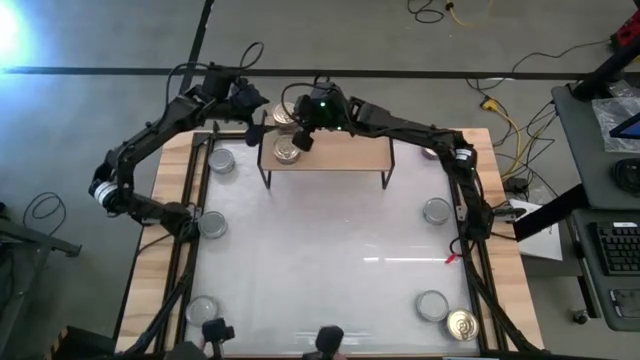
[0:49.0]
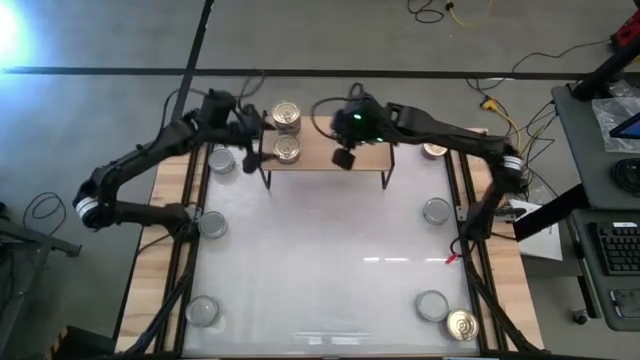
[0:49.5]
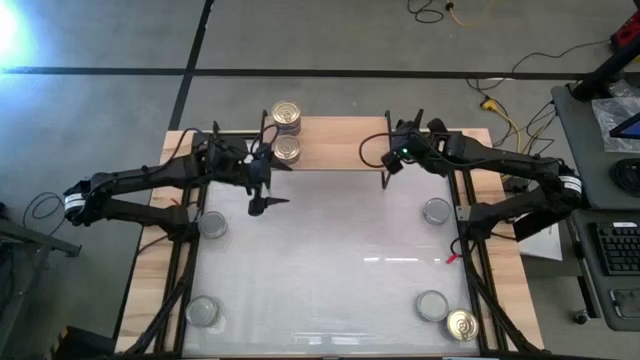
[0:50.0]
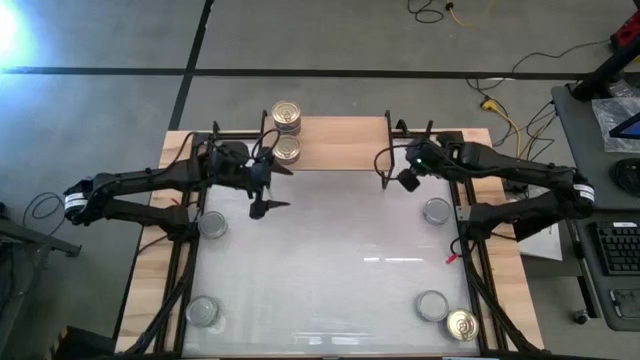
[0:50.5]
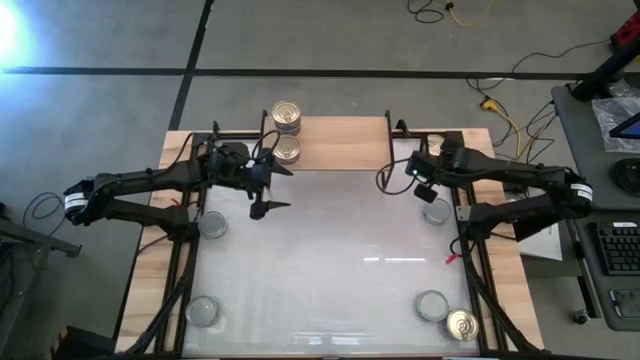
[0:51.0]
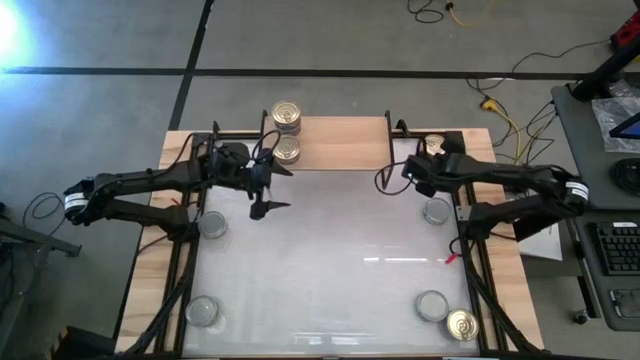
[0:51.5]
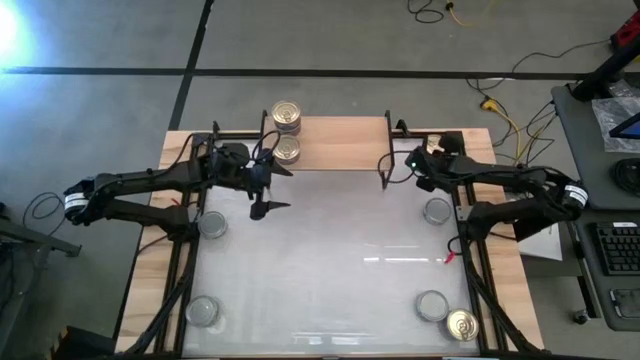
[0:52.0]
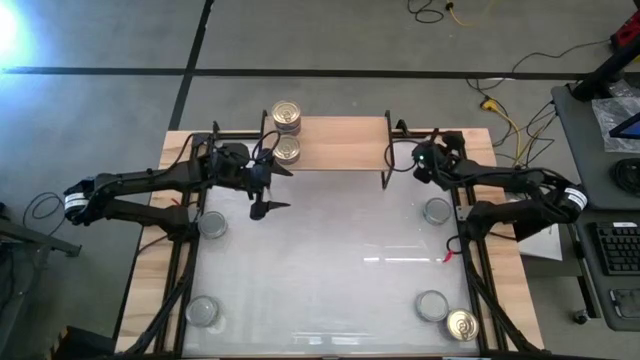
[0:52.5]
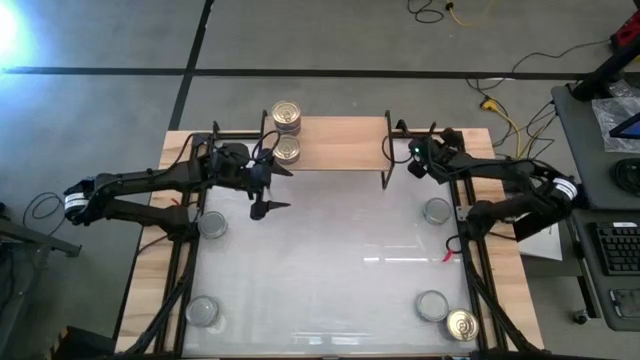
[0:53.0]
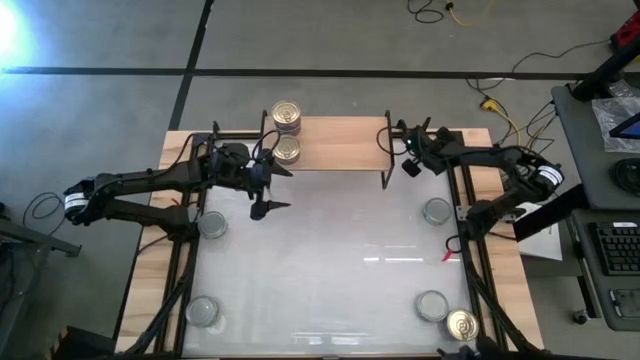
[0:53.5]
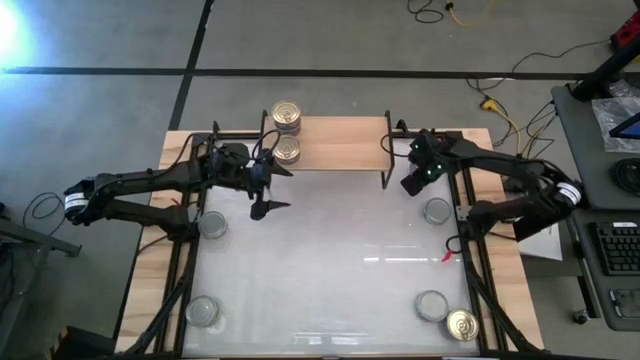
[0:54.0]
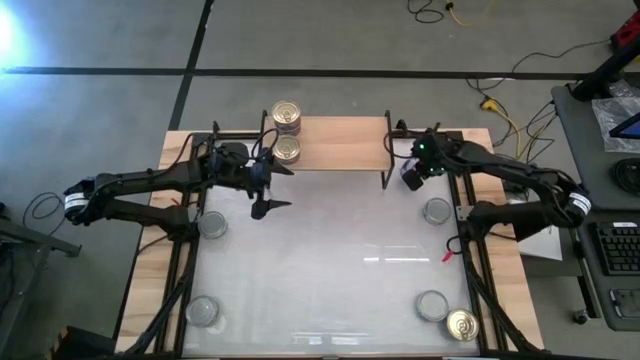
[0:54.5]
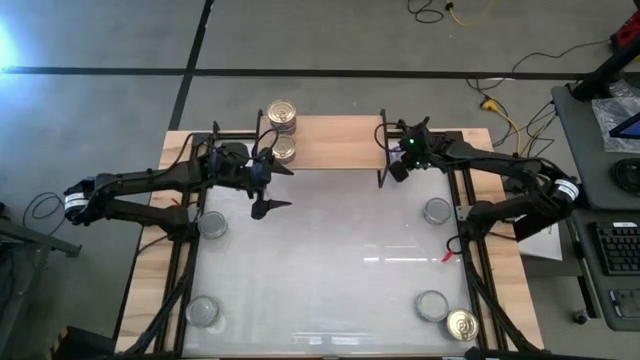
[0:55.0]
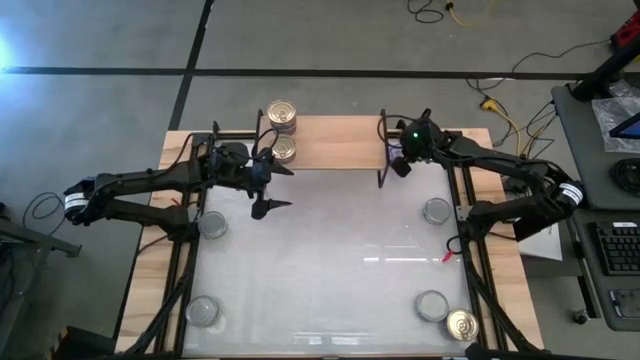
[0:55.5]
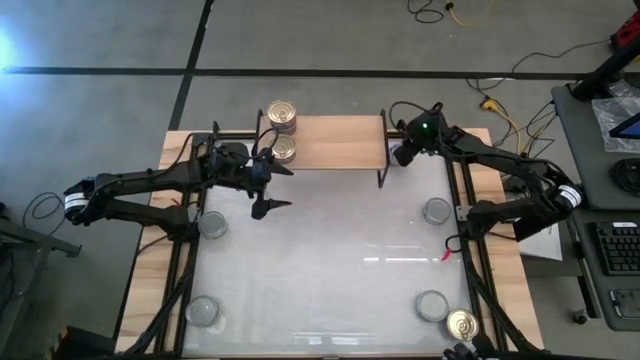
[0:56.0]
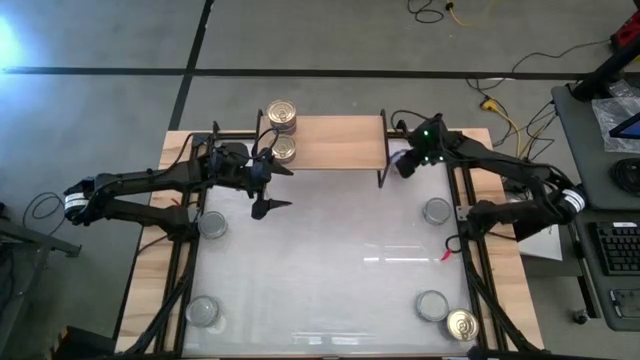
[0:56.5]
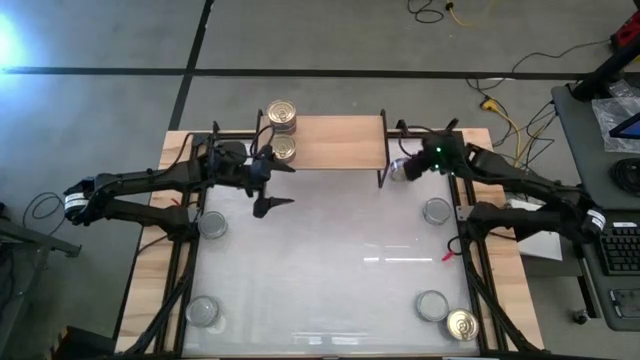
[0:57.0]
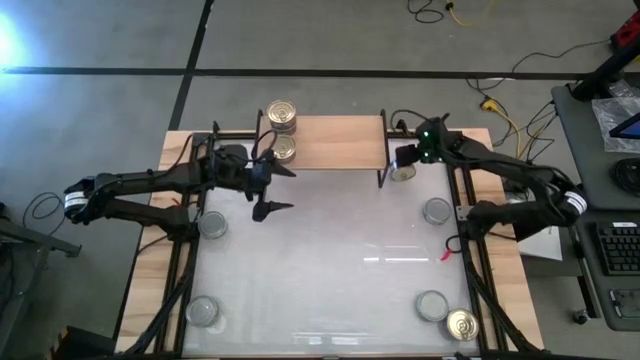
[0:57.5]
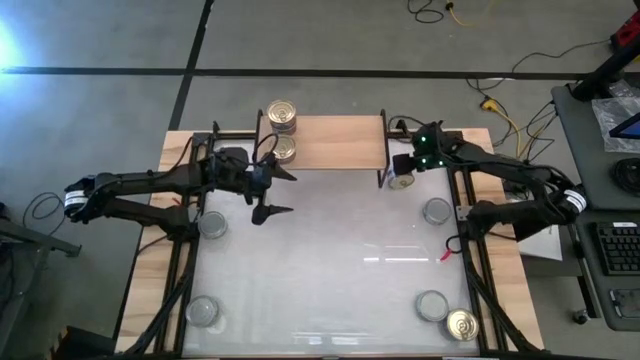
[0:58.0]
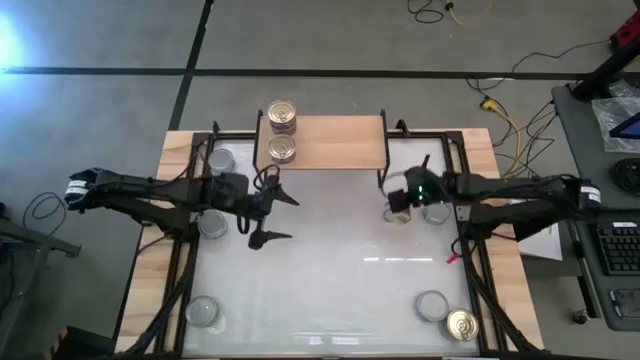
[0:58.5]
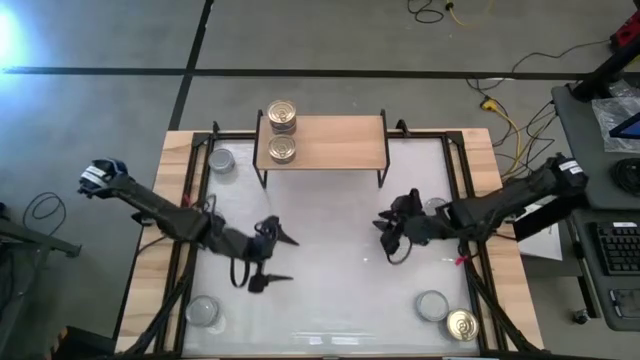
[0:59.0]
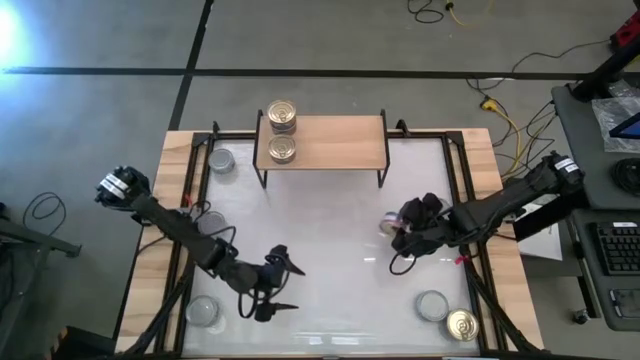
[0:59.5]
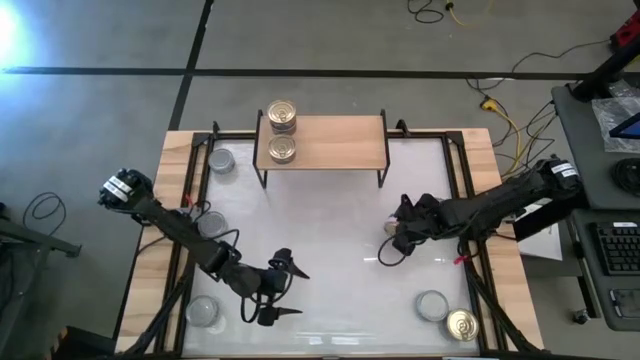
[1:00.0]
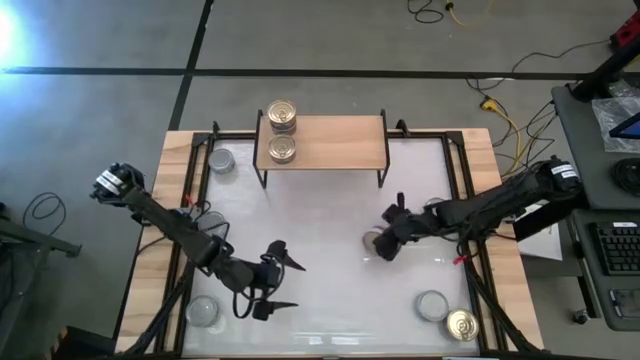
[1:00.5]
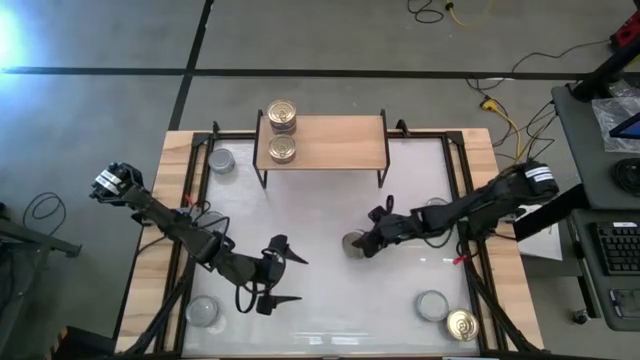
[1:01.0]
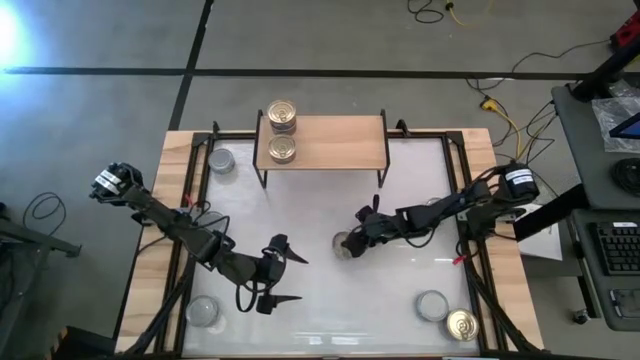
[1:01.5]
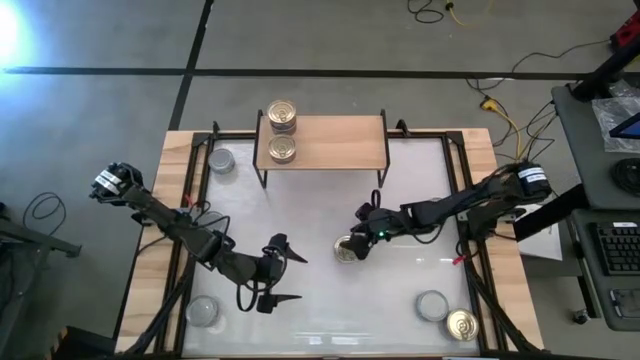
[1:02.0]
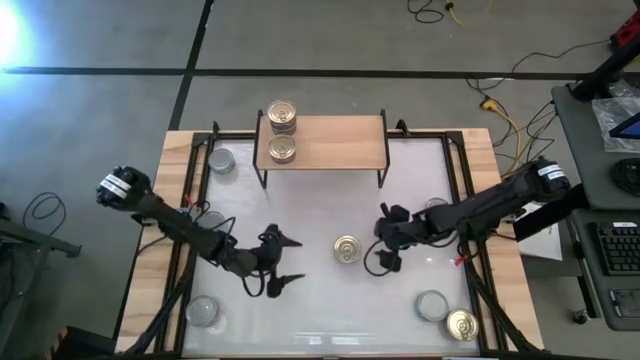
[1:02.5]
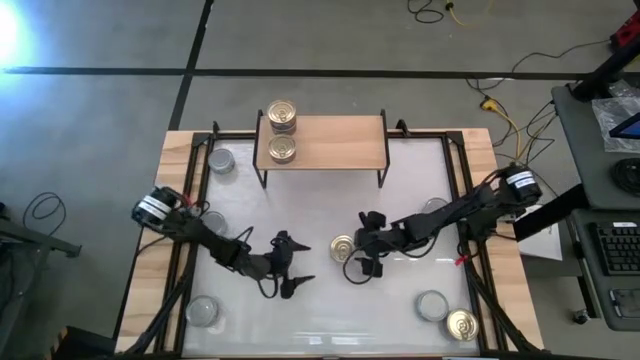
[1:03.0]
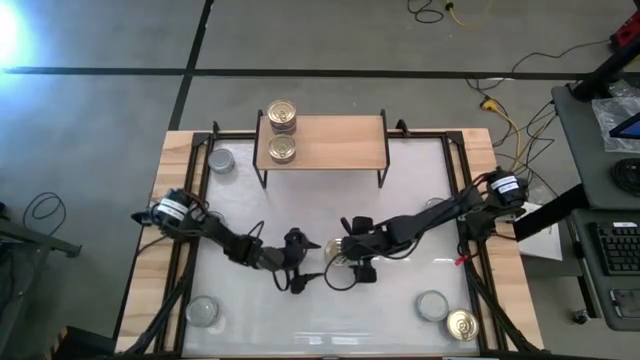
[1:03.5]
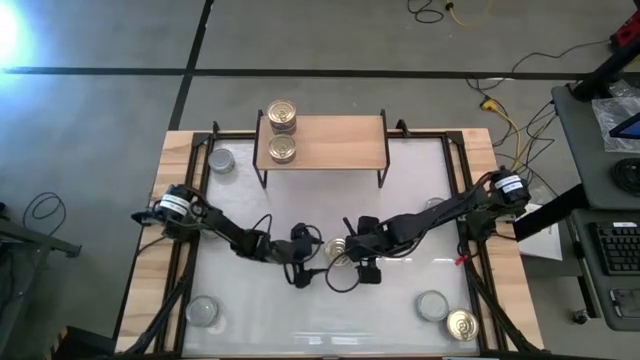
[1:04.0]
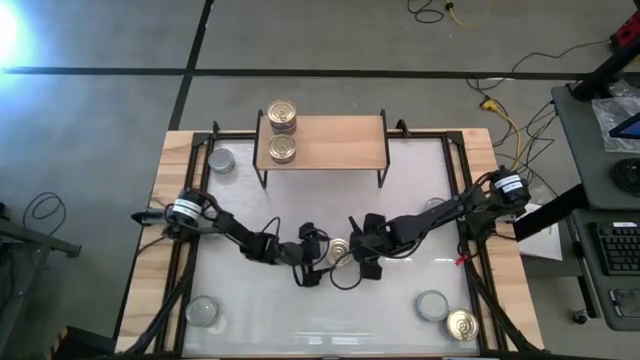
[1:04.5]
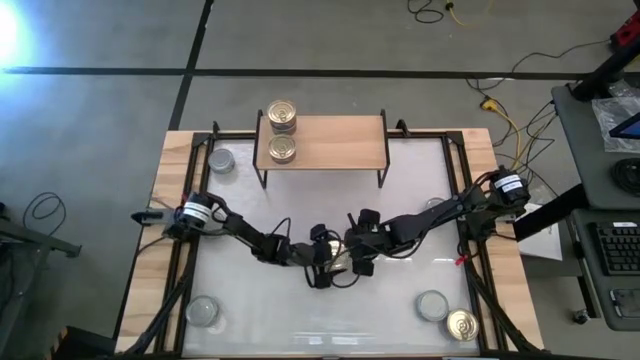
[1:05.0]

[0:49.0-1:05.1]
Task: Stack canned seafood by type on shelf
Stack the blue-pink tuna can on top of the other blue-pink tuna on the shelf

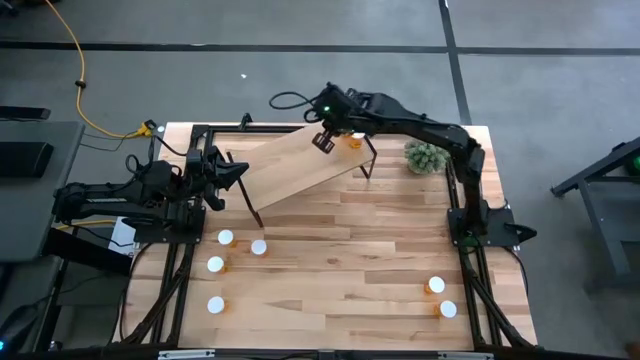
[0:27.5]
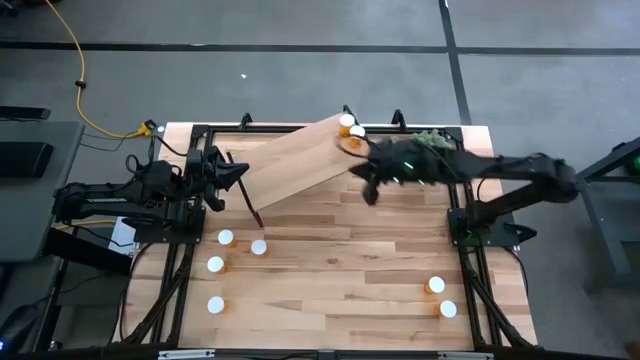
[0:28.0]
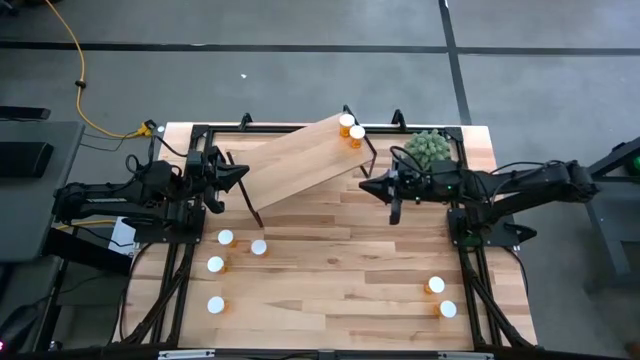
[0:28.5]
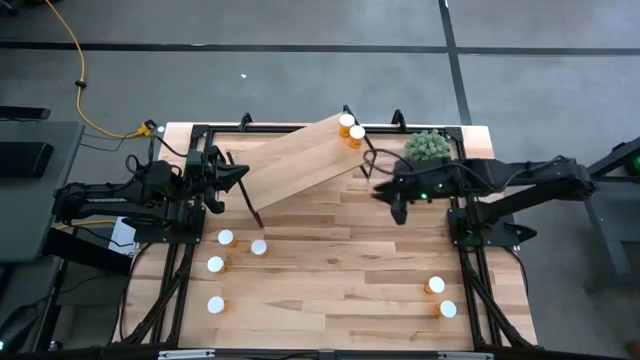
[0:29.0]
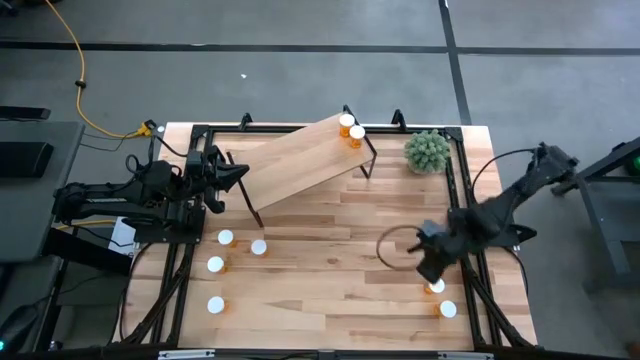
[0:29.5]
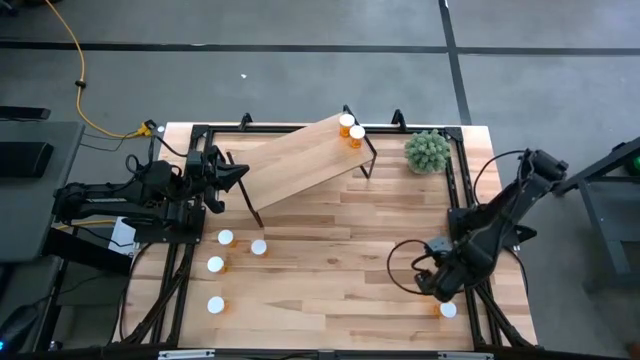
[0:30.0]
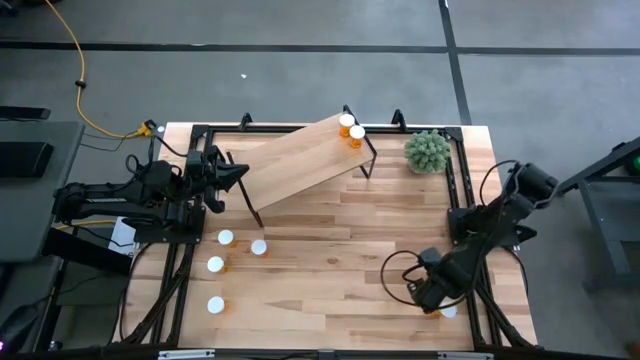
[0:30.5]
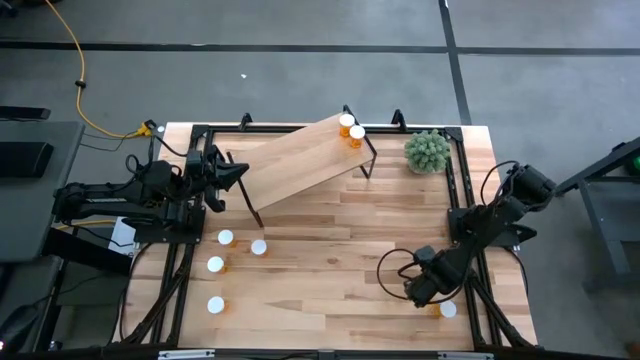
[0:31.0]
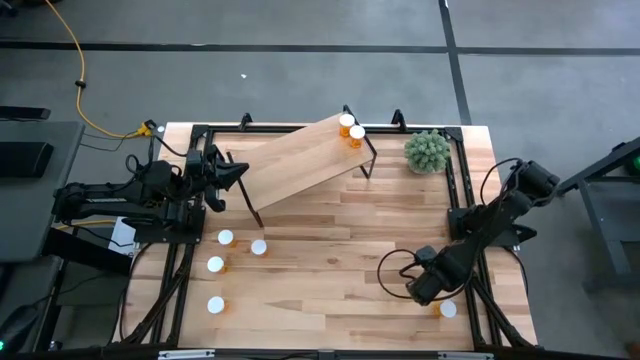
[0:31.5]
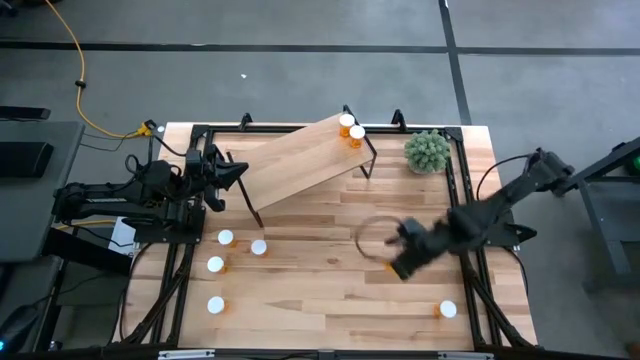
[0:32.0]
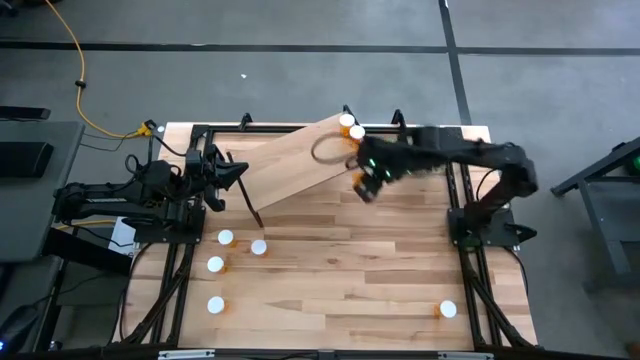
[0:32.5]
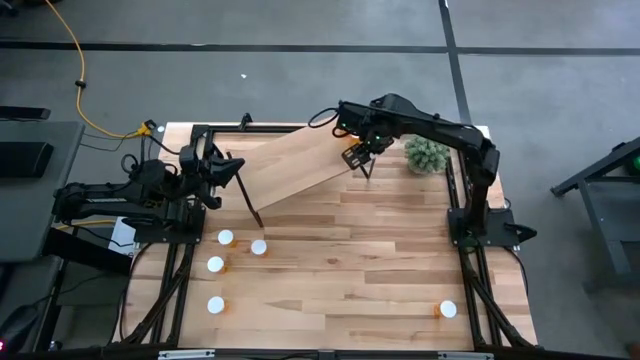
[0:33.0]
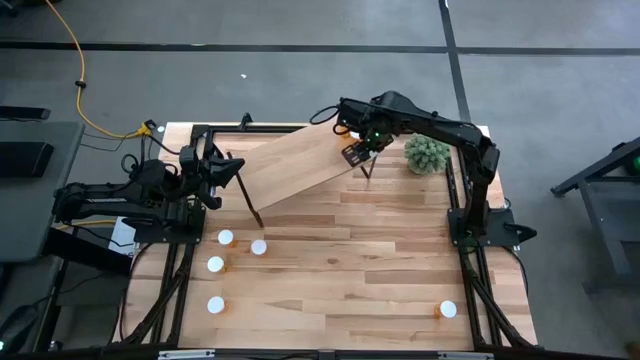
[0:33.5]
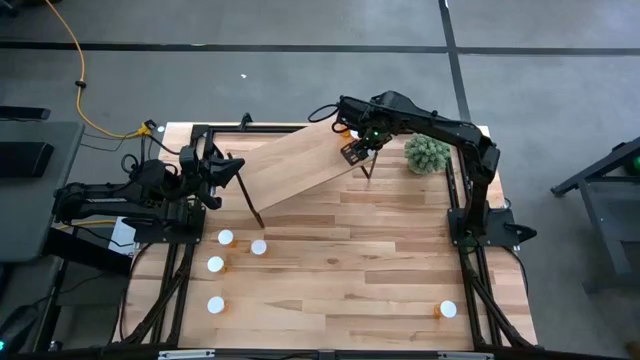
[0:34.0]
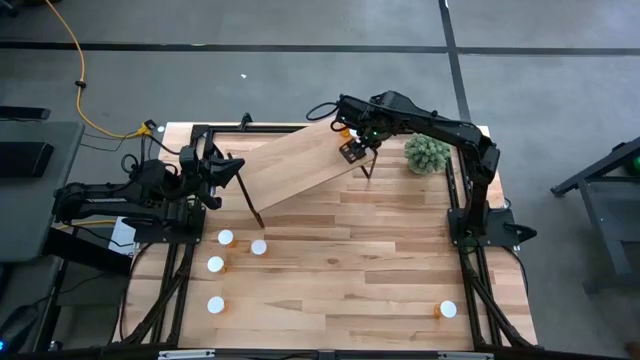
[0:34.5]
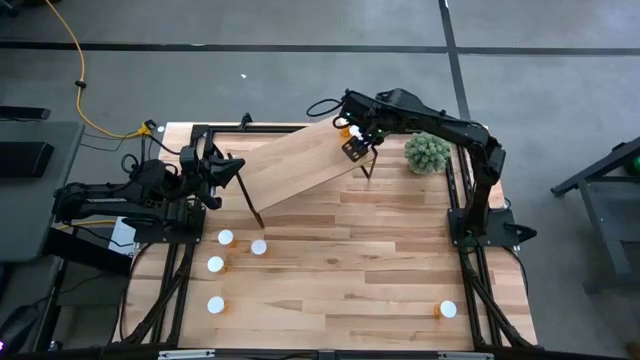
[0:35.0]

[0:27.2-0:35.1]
Task: Pick and place medicine bottles onto shelf by color
Put the pill bottle on the shelf aligned with the other pill bottles
